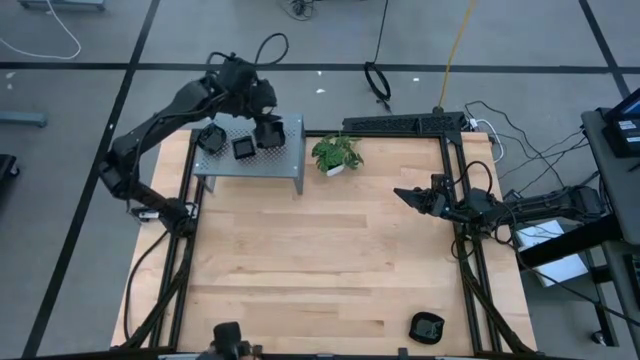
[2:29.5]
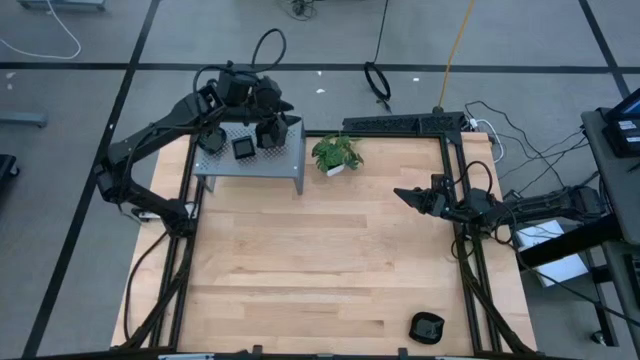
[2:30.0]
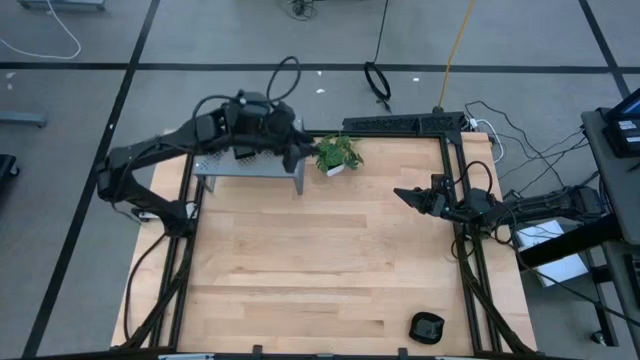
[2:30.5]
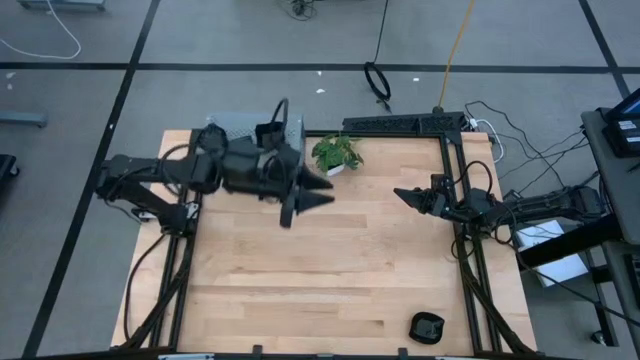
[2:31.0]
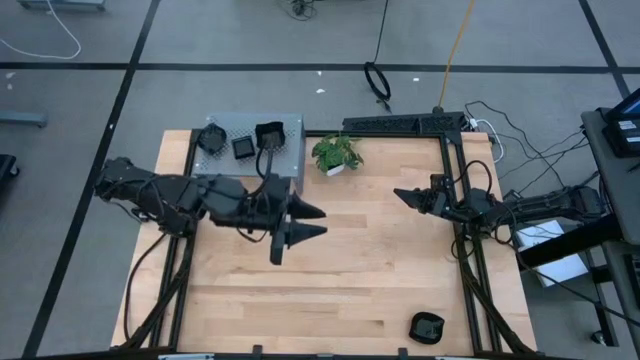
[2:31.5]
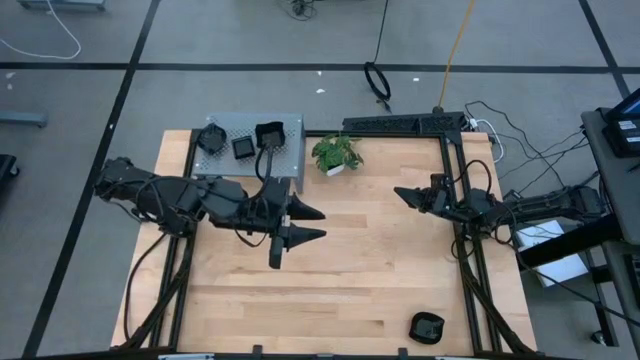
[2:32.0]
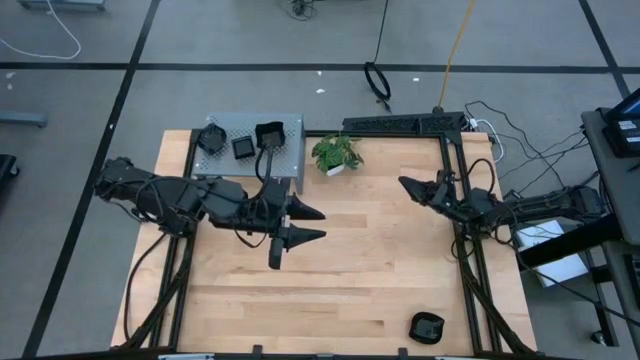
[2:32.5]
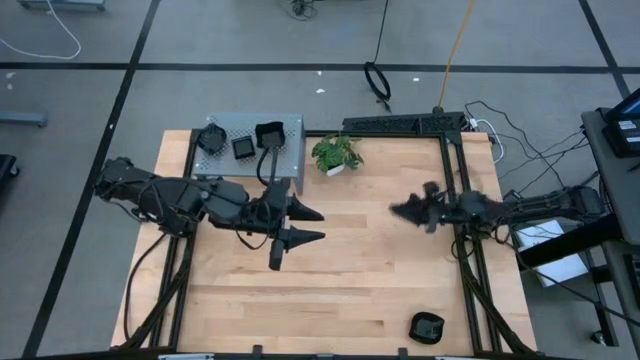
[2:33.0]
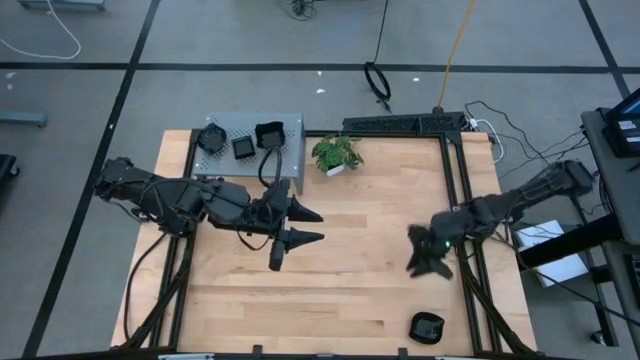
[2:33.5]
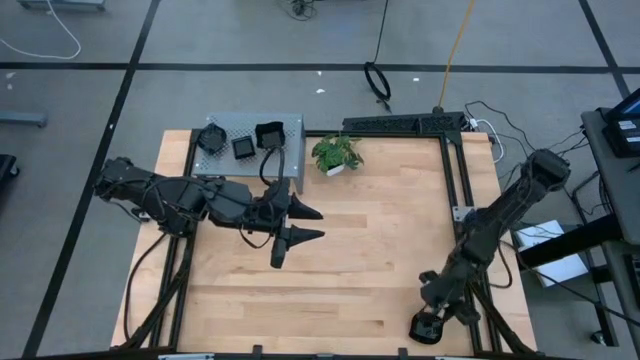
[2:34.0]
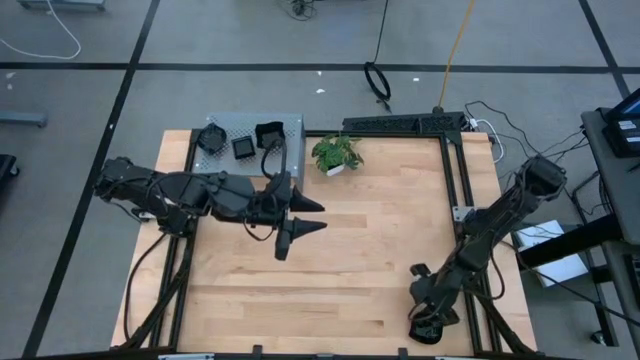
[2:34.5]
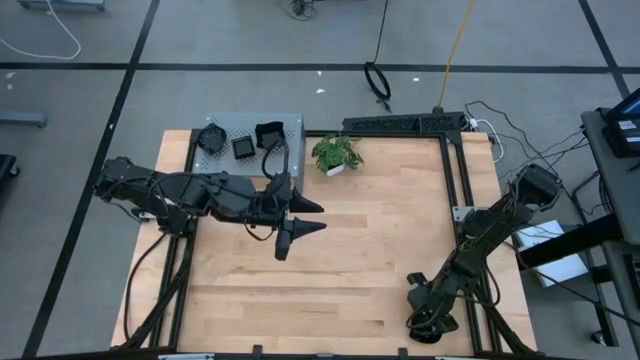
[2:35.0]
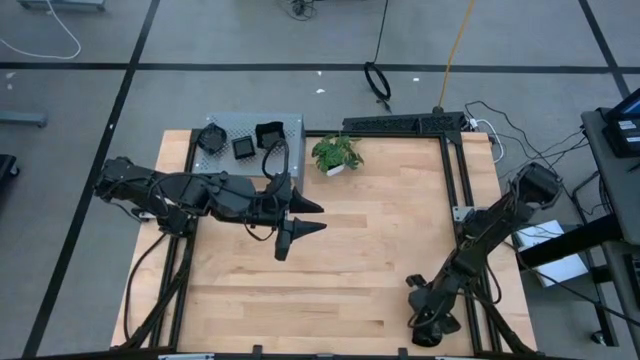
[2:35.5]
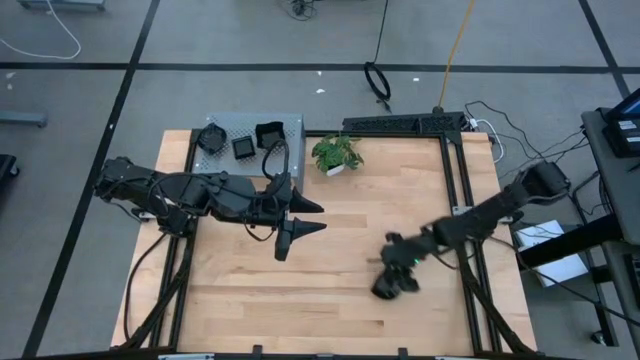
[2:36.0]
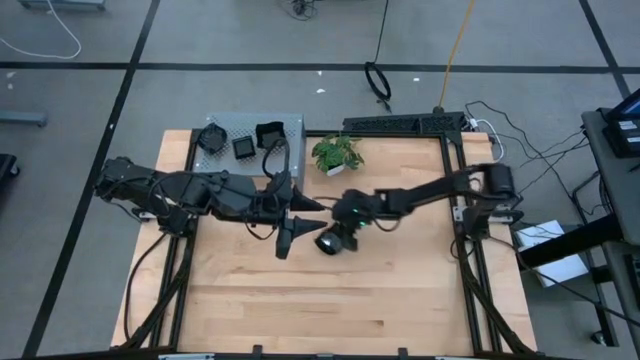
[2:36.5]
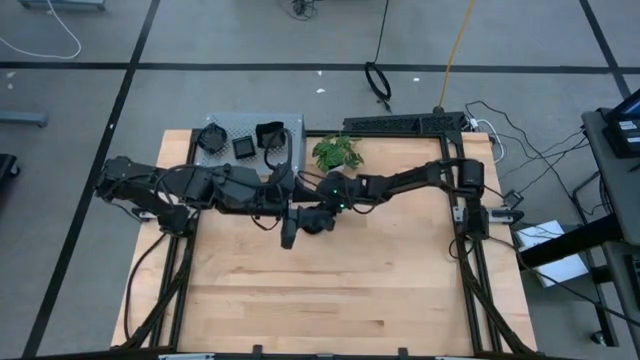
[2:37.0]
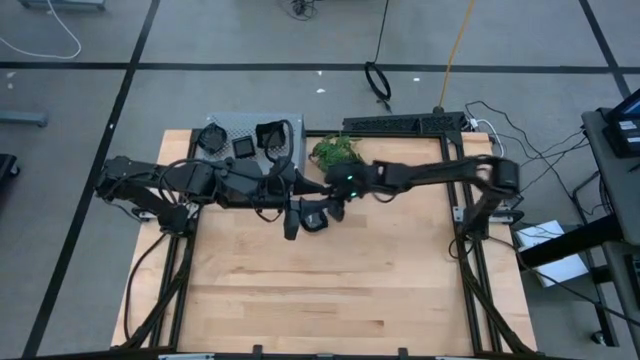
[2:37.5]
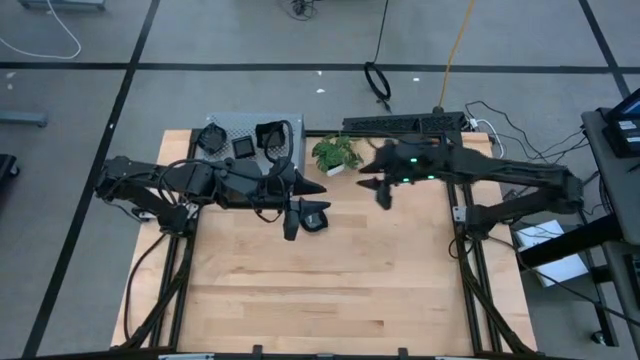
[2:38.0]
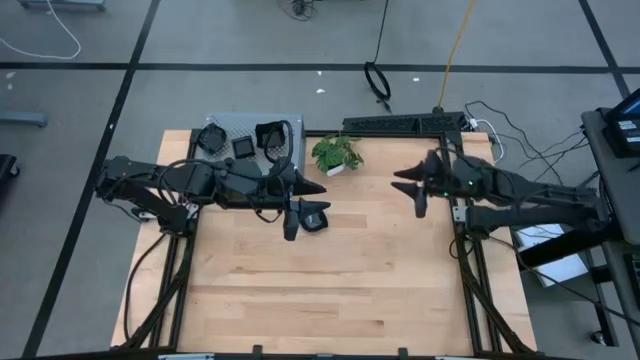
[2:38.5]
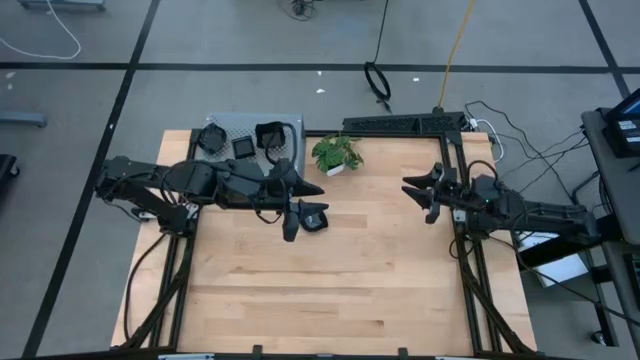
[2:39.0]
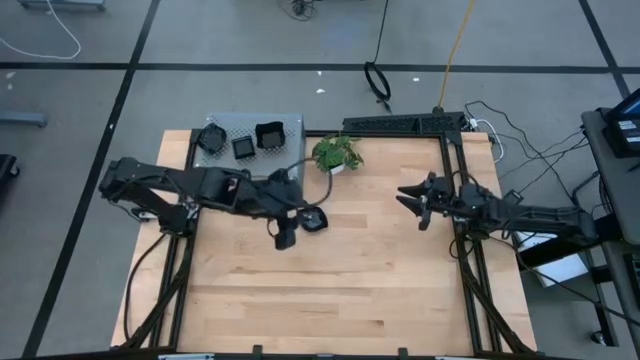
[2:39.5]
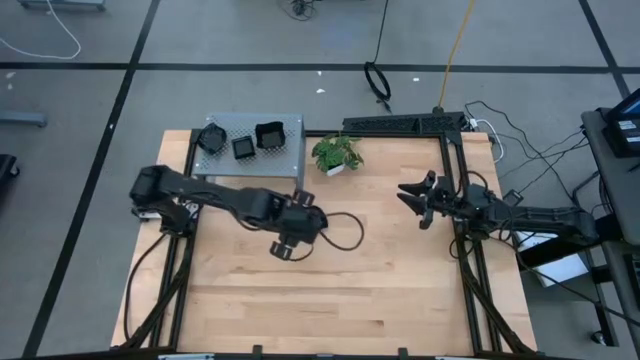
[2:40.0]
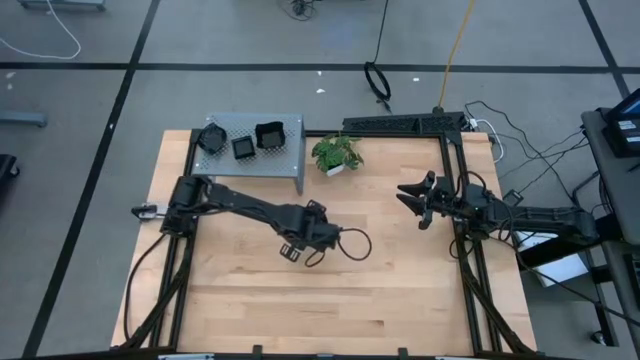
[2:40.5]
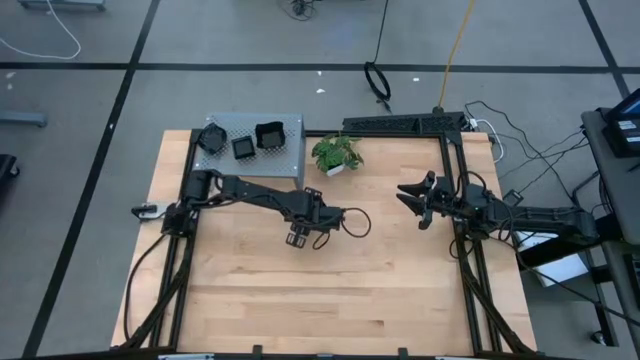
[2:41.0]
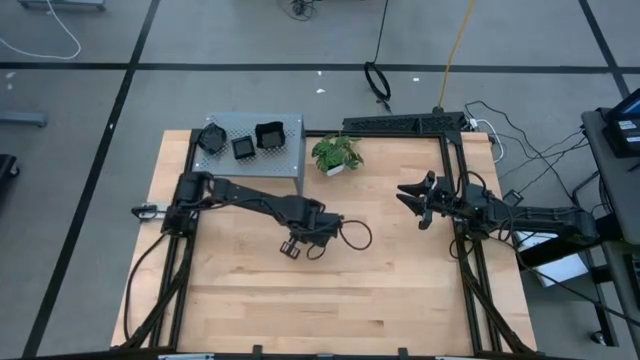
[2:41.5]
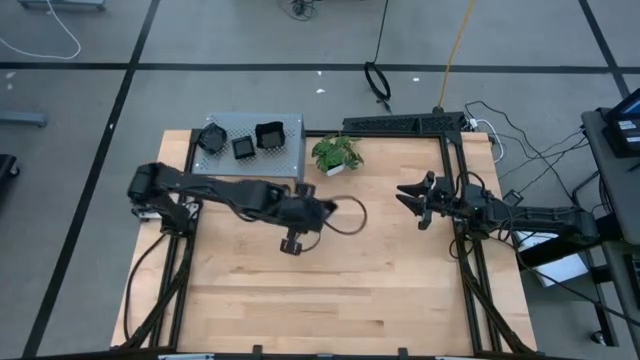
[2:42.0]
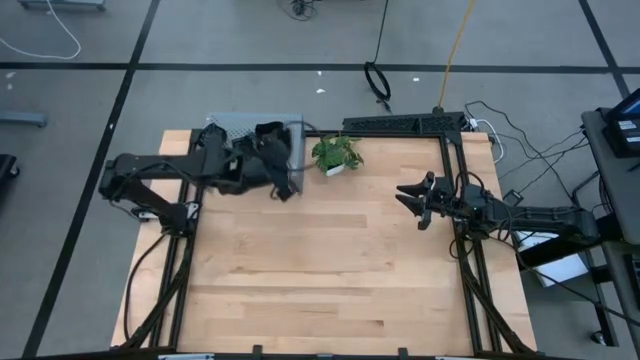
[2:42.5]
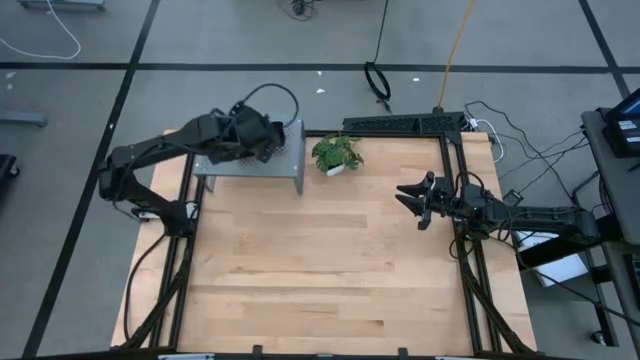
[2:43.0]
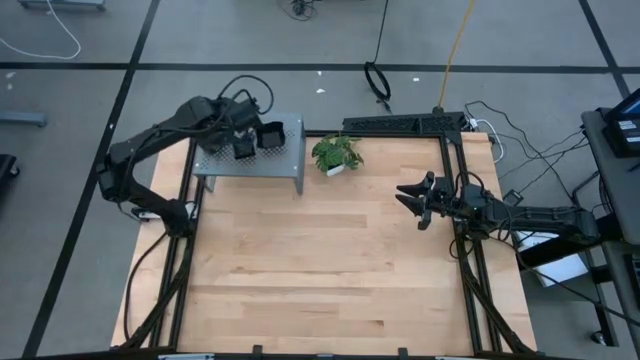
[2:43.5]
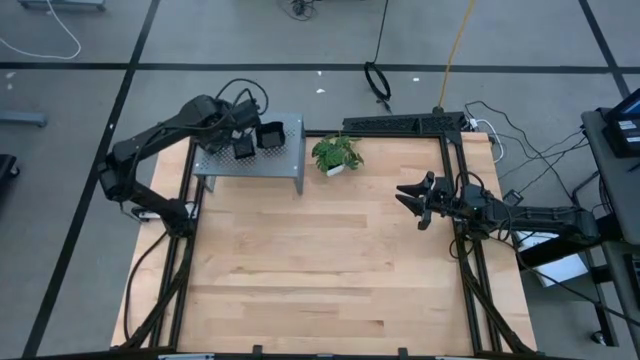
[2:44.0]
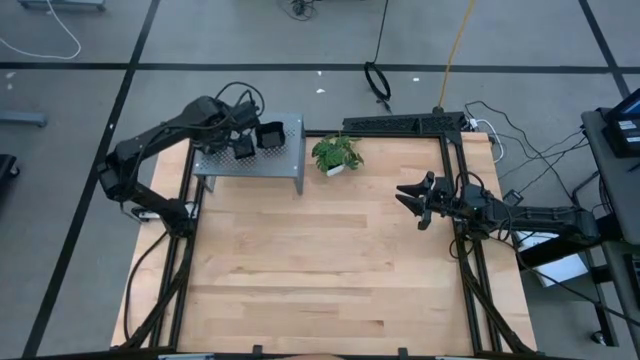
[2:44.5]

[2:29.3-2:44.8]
Task: Pick & Place Mini shaped plates
Stack the black leaf shaped plate on top of the other black leaf shaped plates on the shelf

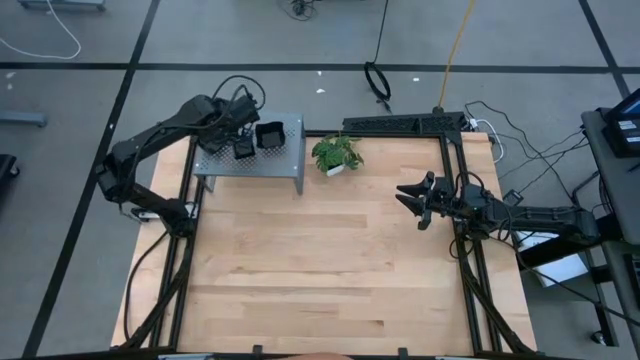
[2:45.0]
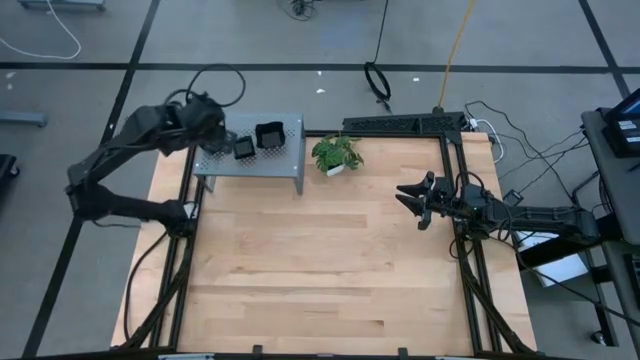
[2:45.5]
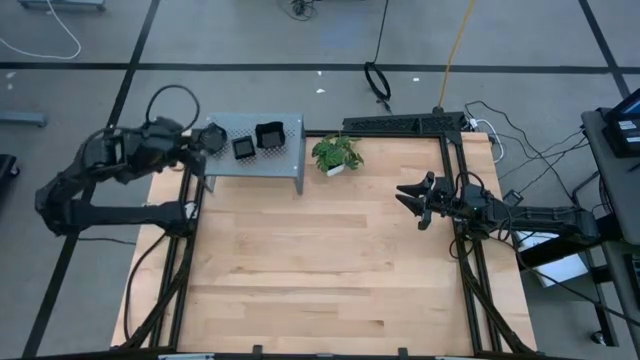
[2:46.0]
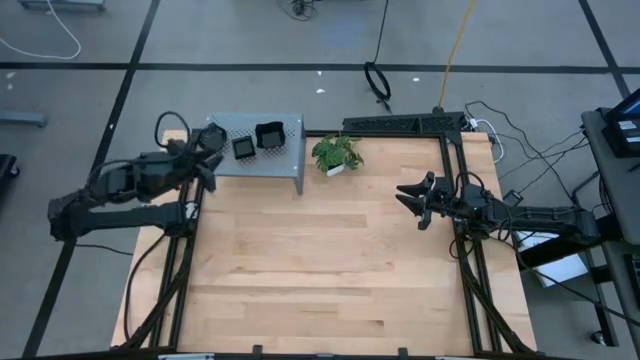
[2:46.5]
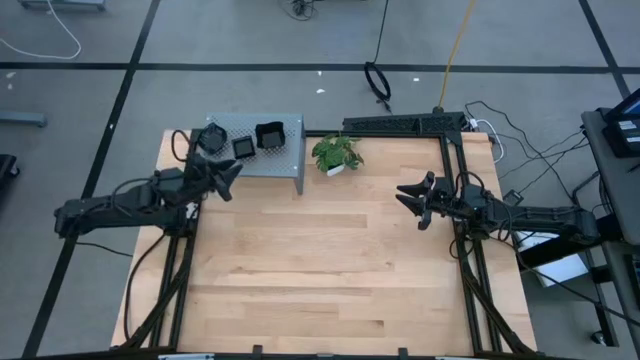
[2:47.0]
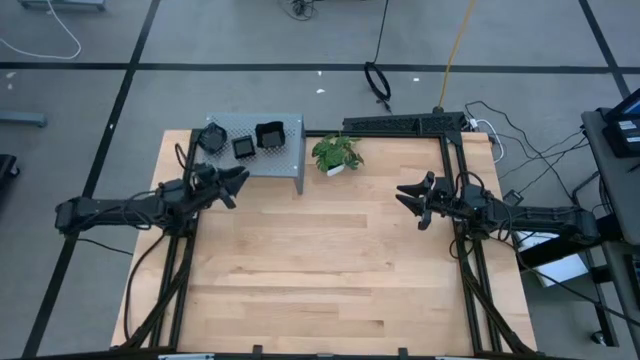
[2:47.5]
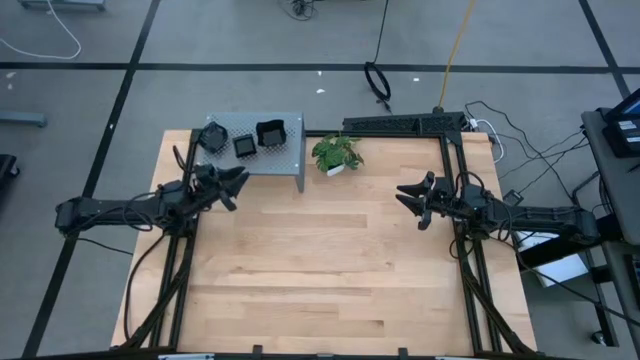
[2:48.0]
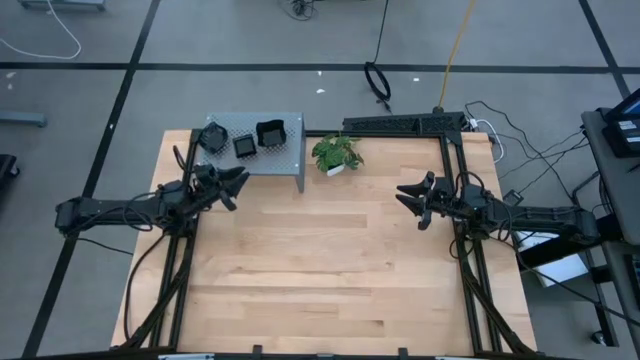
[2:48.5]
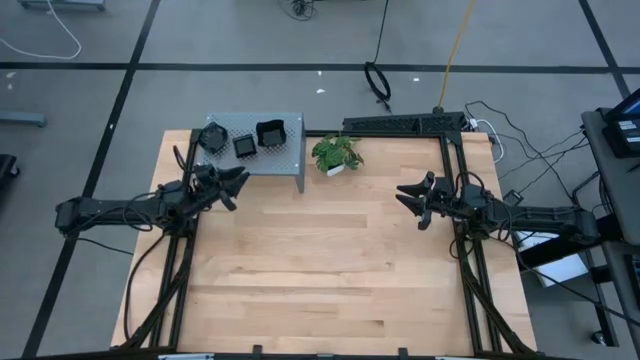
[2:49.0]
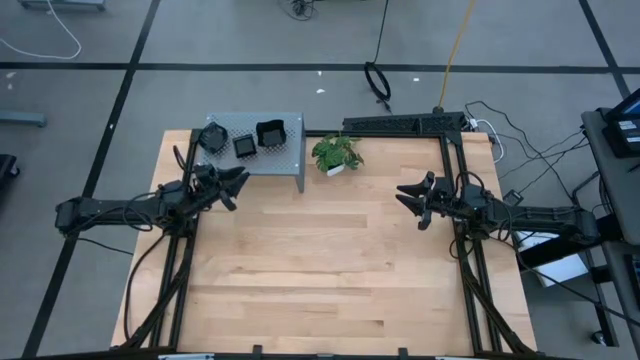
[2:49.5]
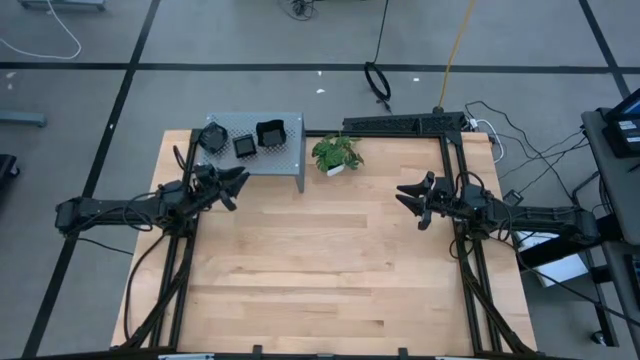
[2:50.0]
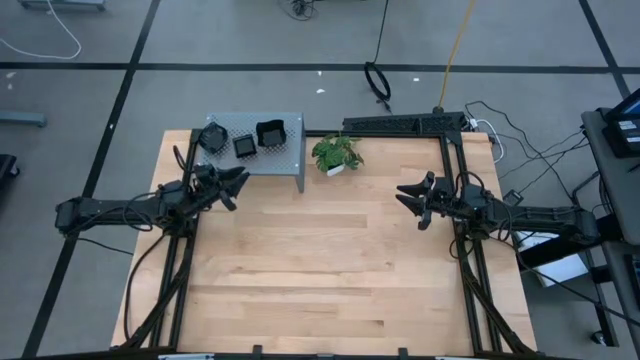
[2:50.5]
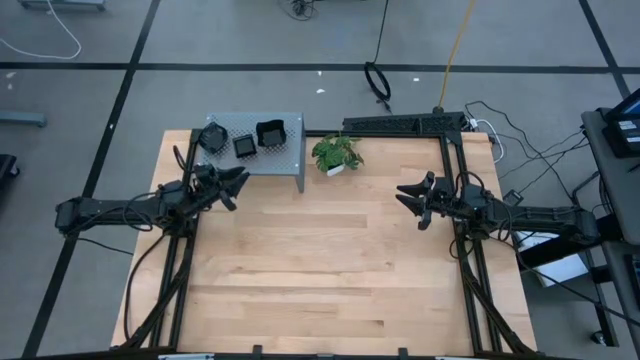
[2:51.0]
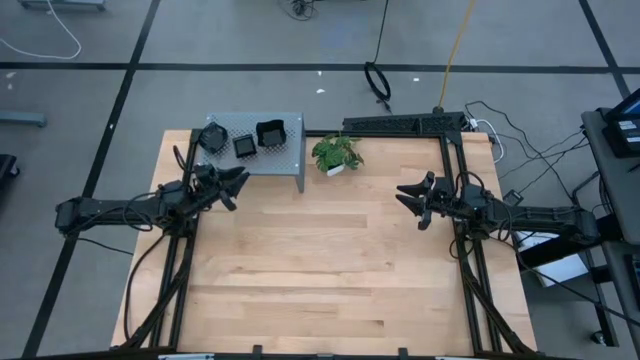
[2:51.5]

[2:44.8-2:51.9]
Return to Home Position
